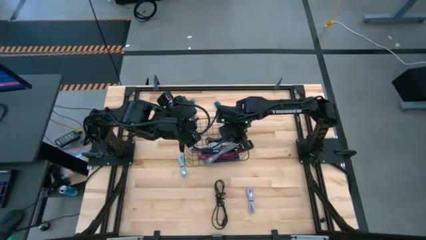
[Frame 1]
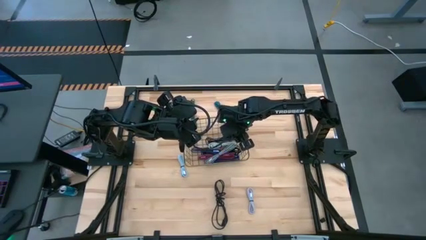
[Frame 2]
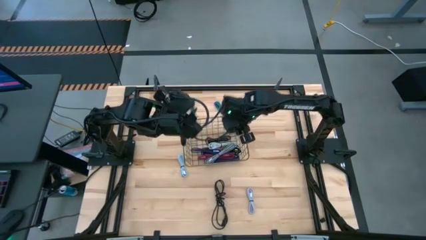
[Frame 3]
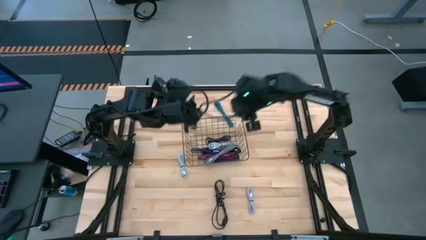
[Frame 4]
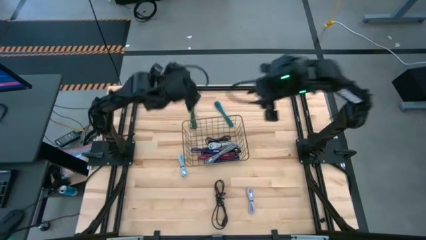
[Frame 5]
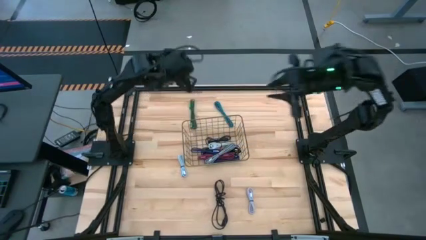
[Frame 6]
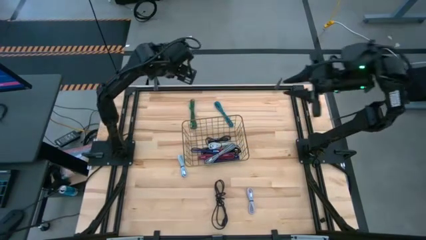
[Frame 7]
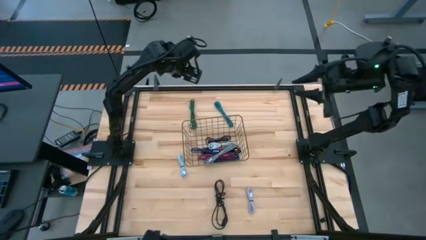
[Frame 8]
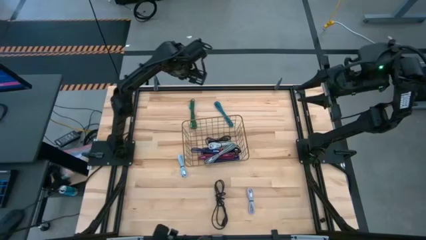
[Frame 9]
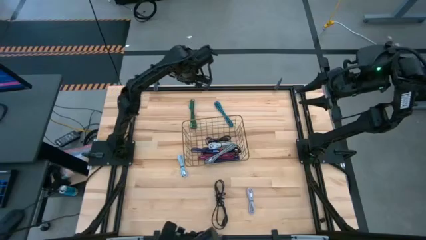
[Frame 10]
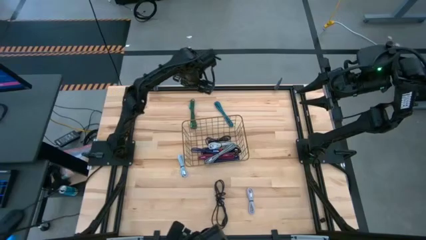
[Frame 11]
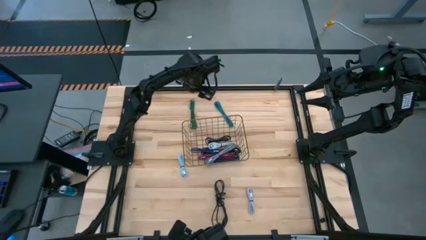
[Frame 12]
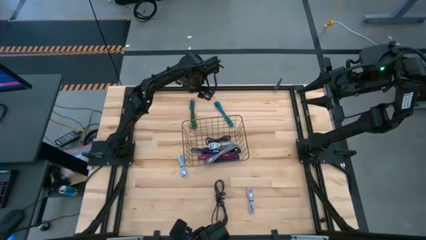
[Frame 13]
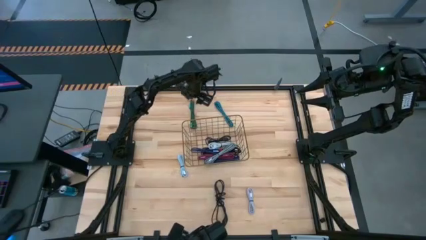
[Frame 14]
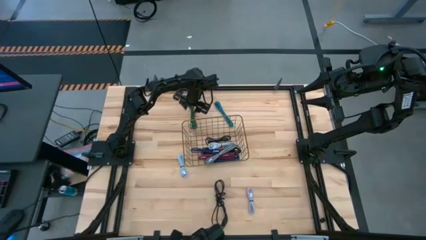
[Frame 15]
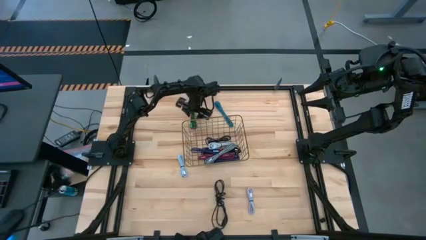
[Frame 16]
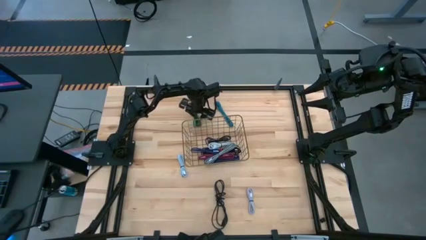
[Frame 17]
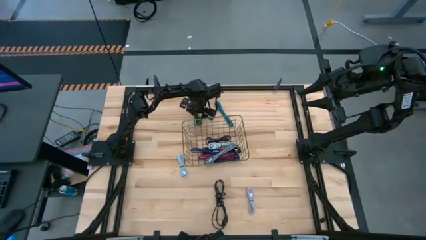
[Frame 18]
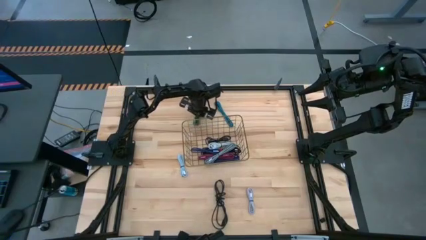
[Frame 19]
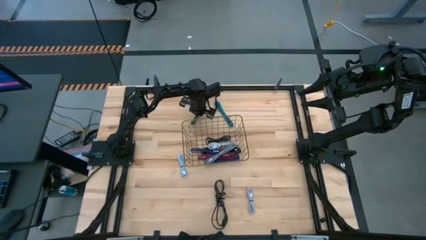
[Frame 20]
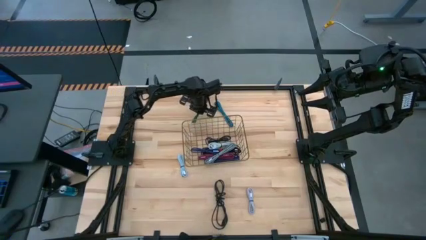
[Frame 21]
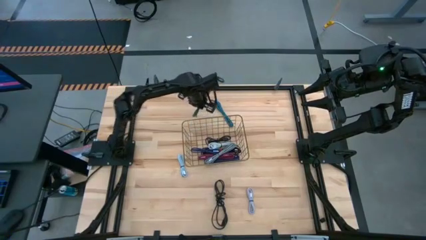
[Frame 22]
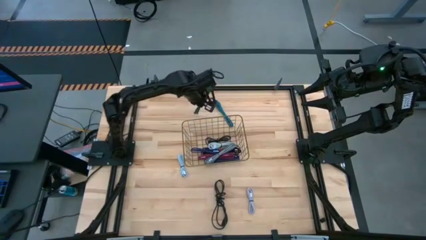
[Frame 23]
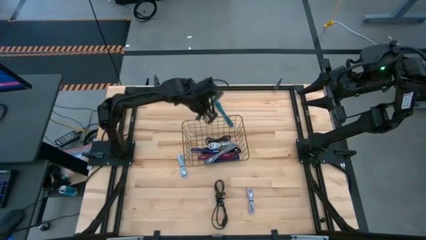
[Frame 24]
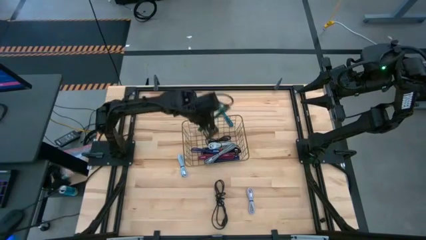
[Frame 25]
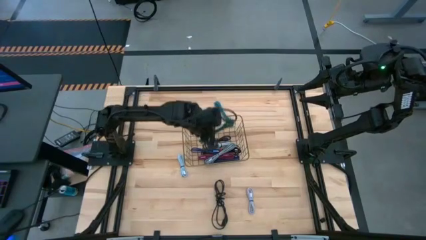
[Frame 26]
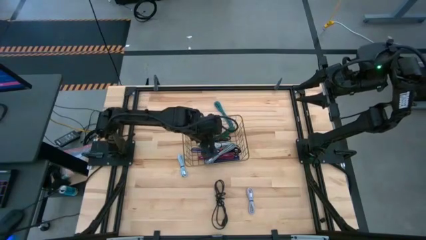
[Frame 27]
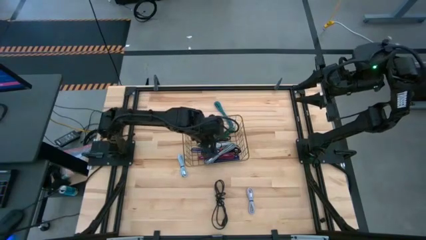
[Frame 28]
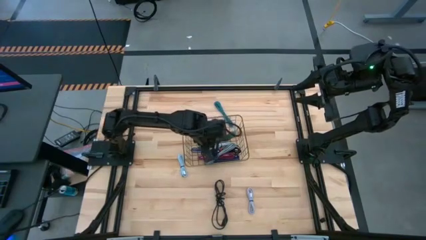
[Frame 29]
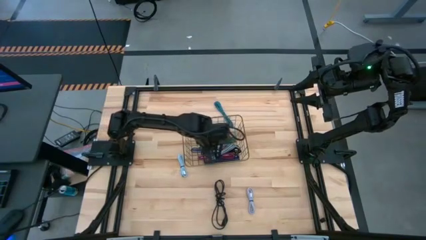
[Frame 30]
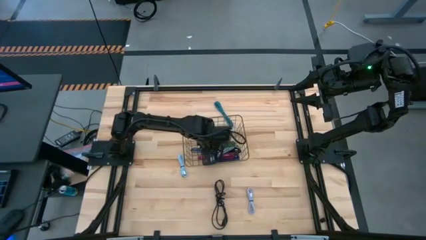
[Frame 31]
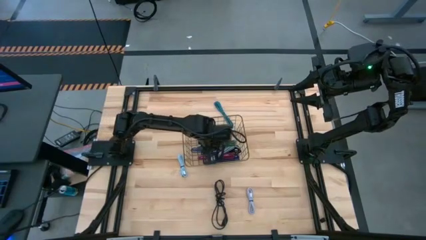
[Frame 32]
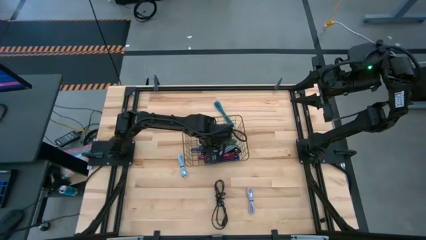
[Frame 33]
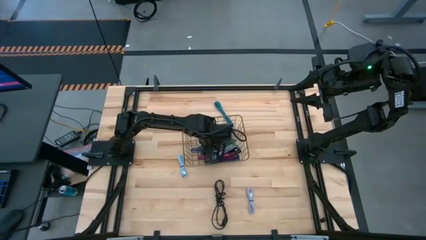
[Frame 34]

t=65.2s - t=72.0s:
Task: Pick and place USB-C Cables
Put the green USB cable into the gold wire basket

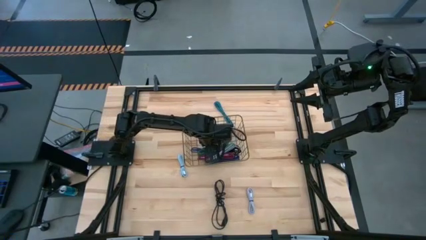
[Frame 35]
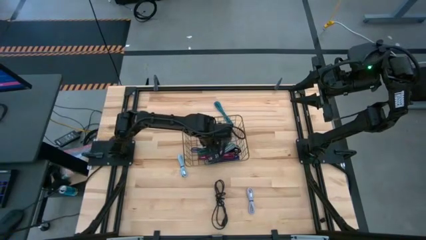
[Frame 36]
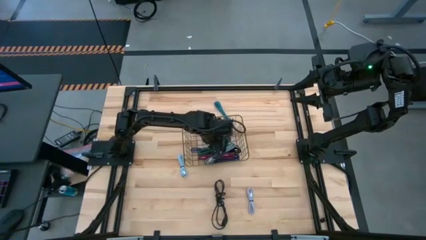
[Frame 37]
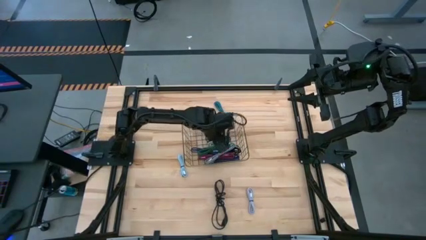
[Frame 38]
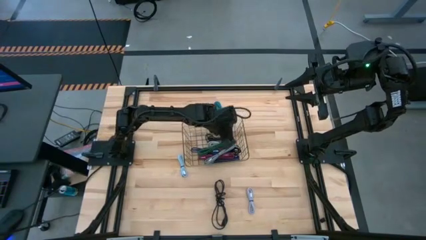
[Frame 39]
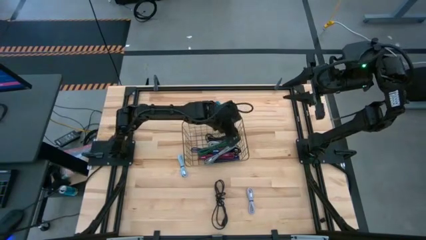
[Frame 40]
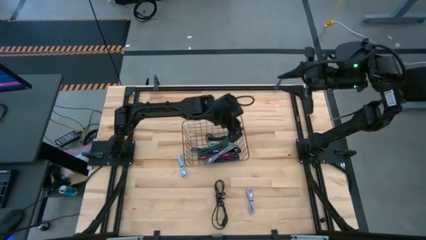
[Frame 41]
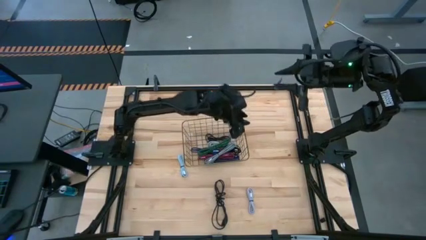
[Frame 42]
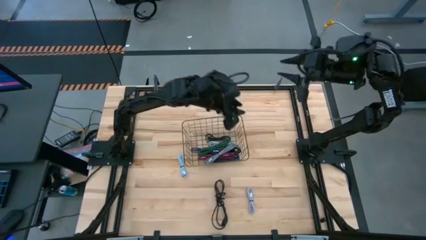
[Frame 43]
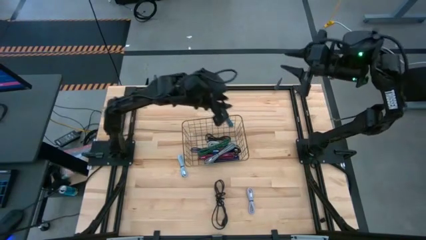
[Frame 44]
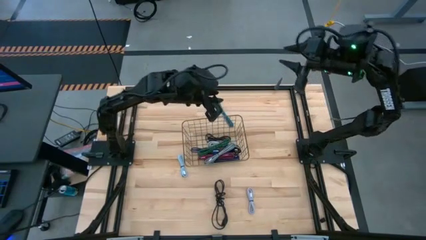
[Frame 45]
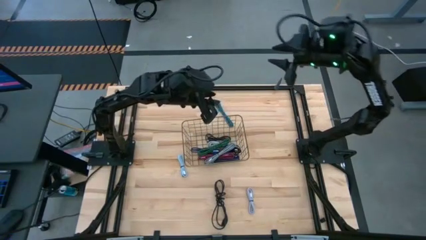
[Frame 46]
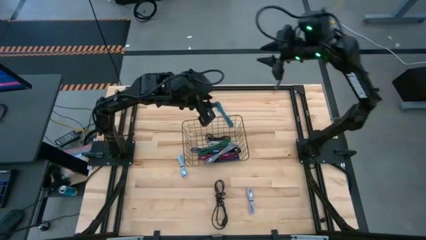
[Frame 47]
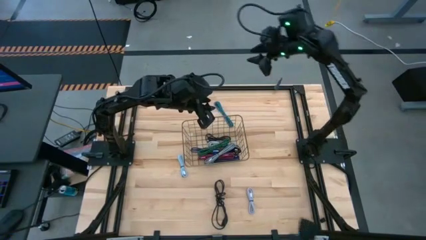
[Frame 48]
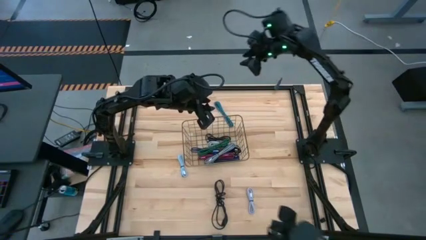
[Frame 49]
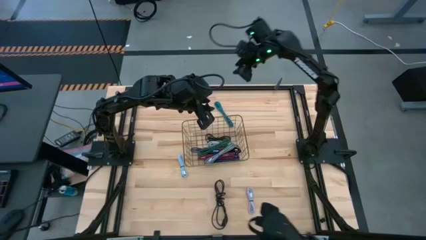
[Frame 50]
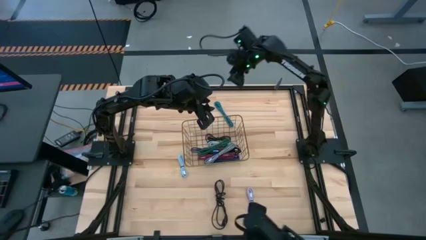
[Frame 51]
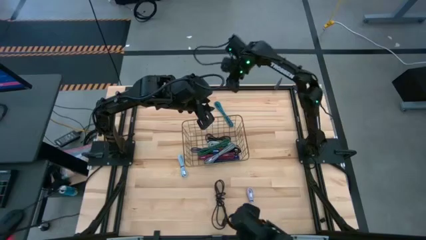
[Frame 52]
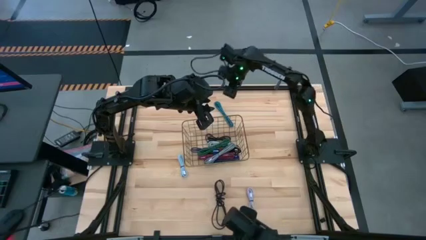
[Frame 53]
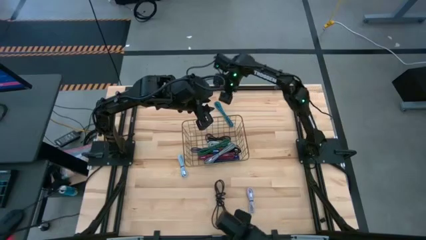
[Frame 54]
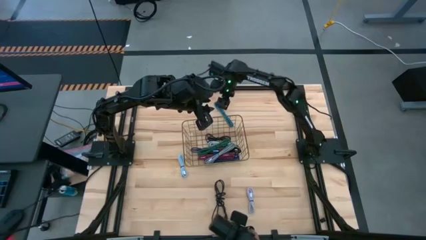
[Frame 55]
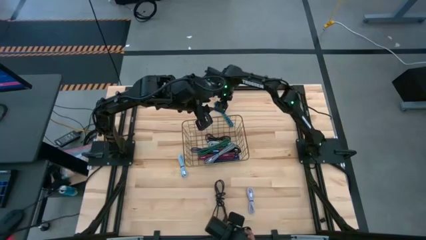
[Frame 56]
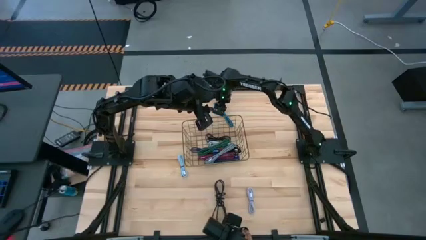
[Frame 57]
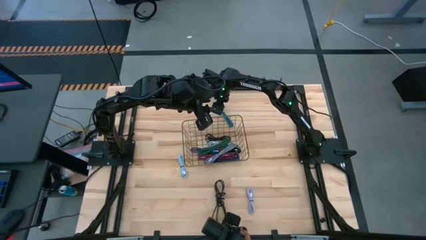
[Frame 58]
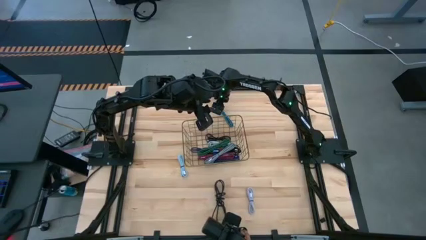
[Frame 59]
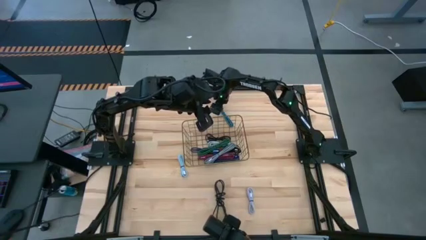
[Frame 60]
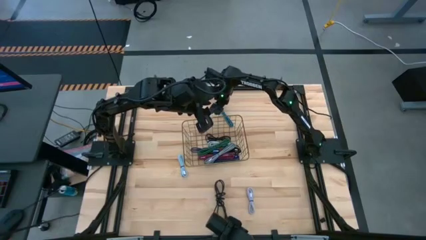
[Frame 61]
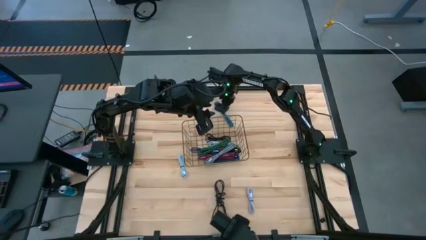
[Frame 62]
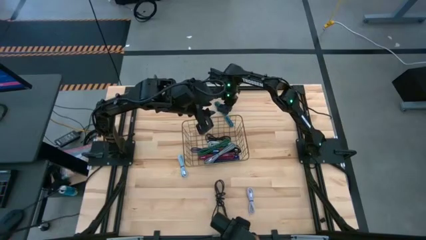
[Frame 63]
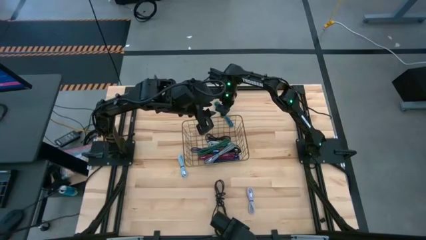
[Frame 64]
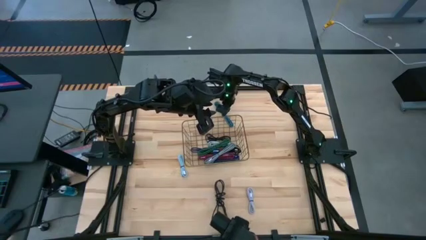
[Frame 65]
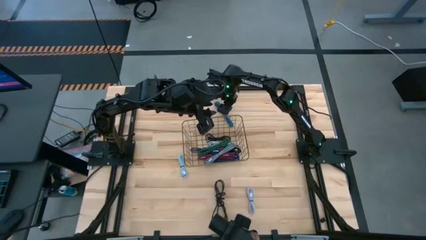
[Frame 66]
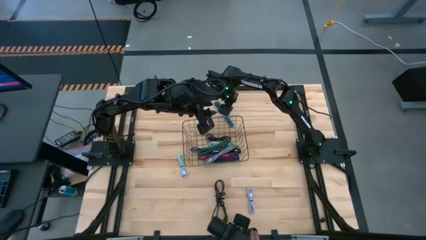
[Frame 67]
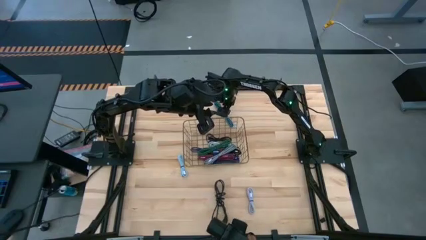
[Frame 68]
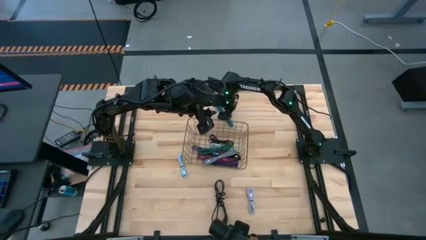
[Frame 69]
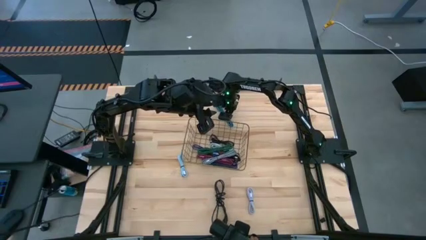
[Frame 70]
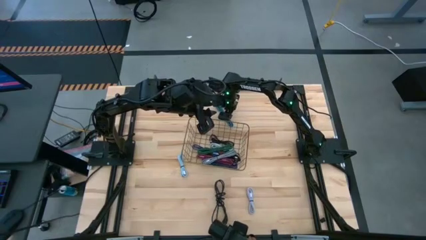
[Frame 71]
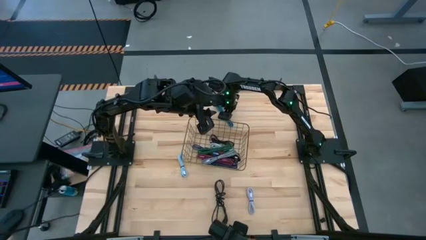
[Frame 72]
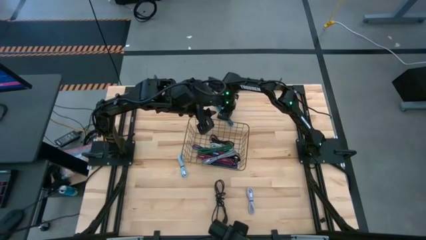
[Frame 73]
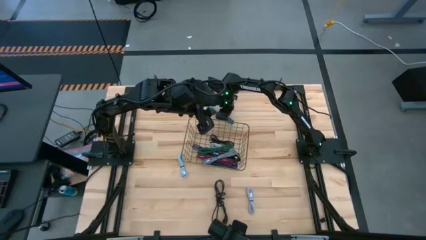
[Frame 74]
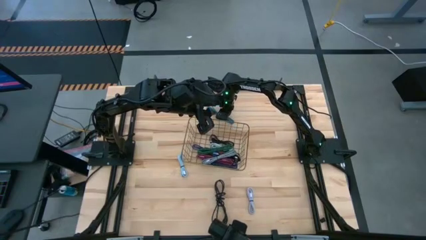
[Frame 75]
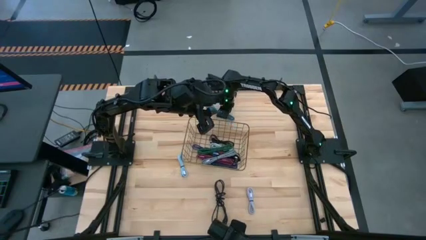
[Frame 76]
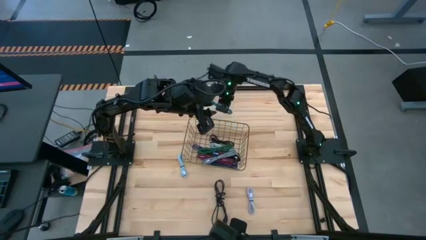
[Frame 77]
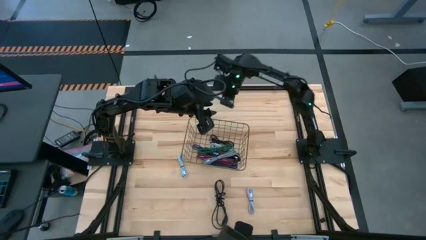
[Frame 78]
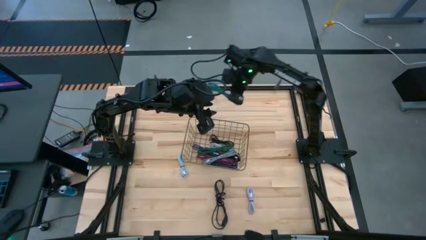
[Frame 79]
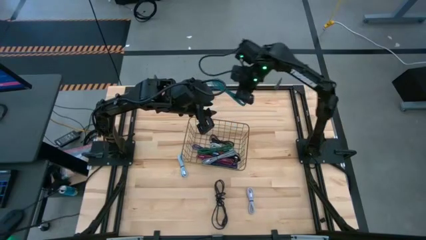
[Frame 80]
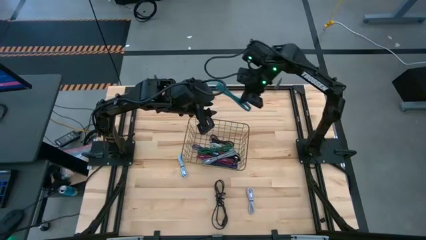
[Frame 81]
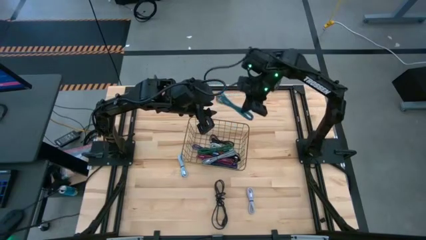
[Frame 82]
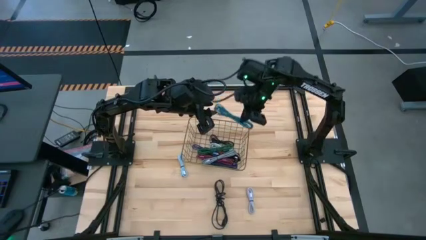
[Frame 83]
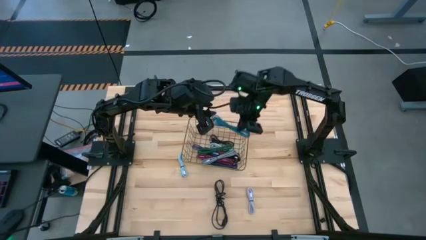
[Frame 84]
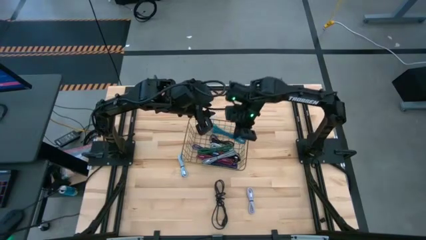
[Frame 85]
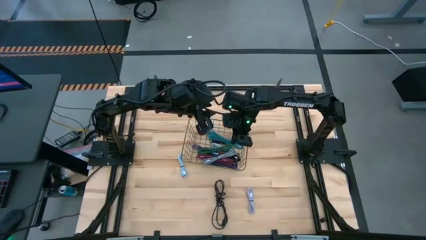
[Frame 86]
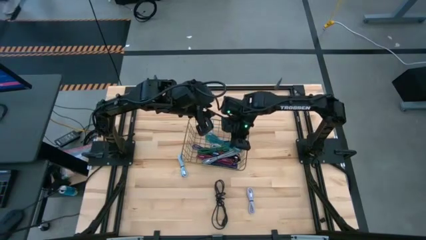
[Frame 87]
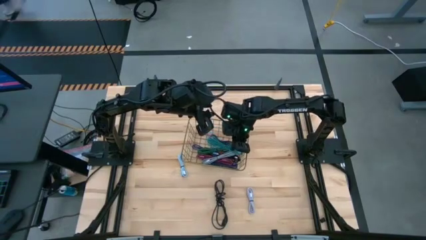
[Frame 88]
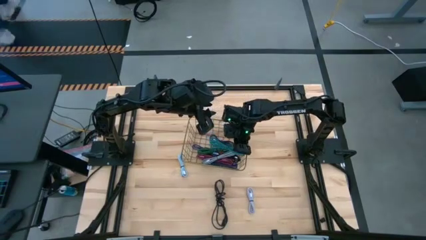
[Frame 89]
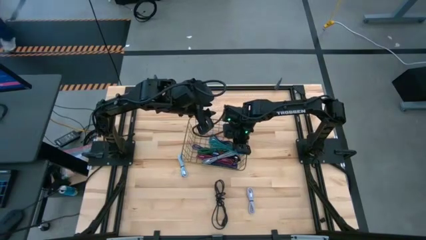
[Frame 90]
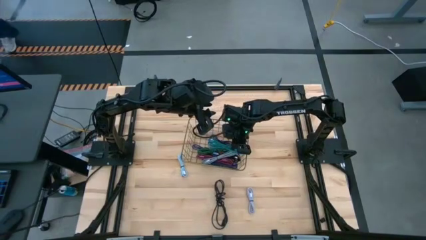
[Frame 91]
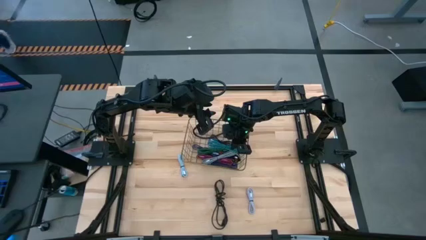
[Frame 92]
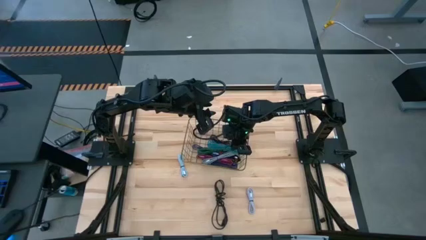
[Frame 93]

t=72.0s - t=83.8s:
Put the blue USB cable into the gold wire basket
